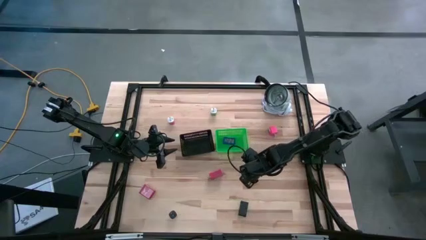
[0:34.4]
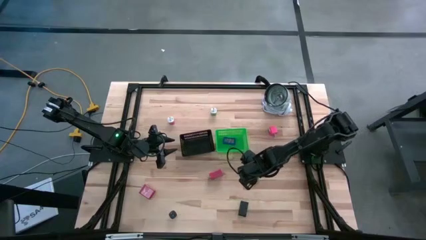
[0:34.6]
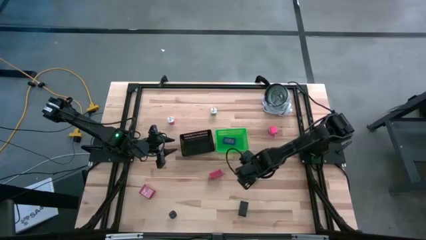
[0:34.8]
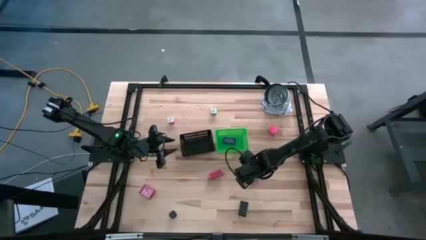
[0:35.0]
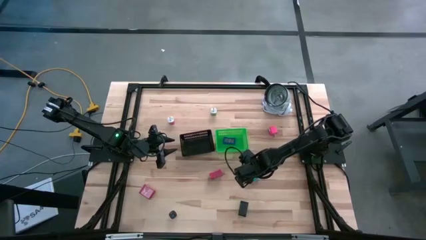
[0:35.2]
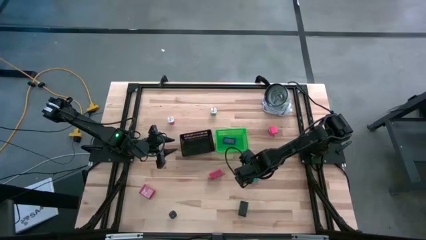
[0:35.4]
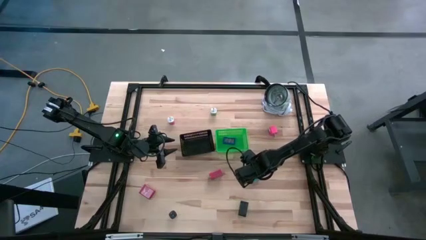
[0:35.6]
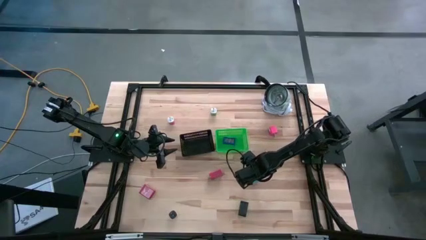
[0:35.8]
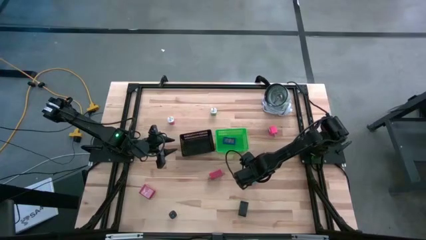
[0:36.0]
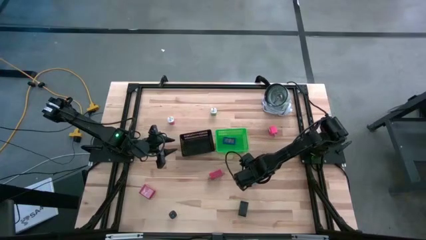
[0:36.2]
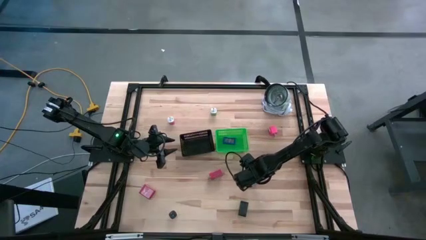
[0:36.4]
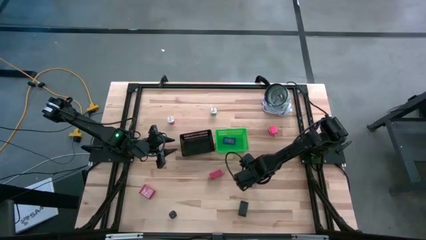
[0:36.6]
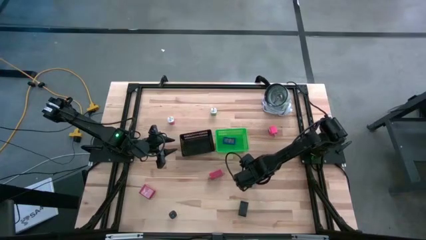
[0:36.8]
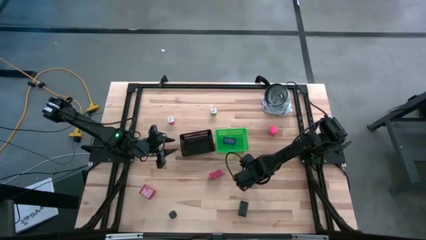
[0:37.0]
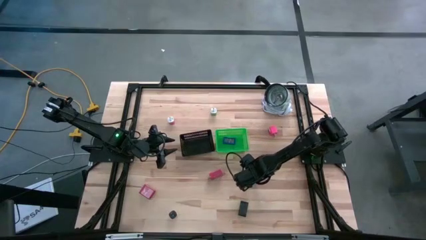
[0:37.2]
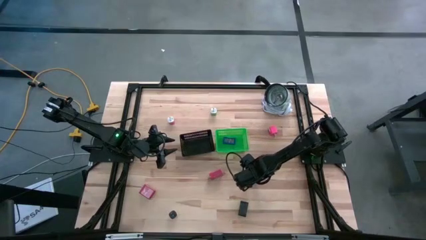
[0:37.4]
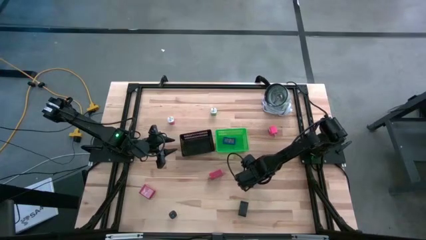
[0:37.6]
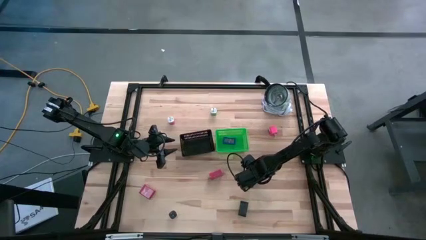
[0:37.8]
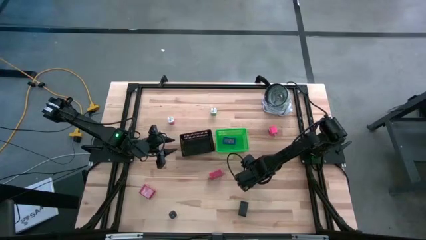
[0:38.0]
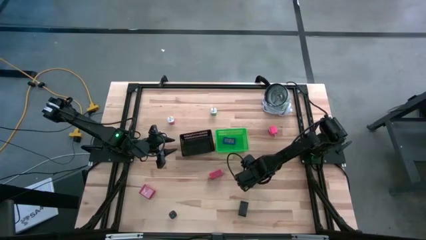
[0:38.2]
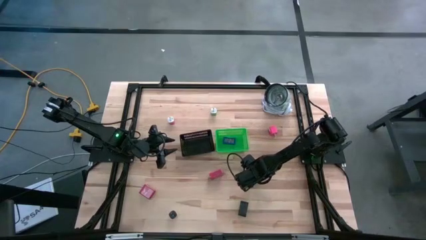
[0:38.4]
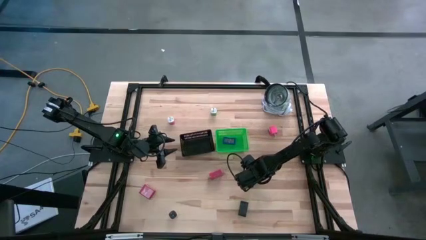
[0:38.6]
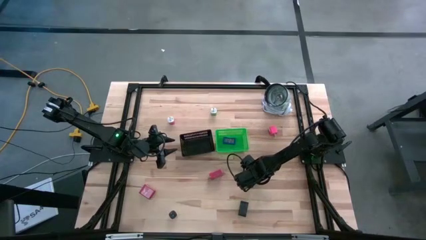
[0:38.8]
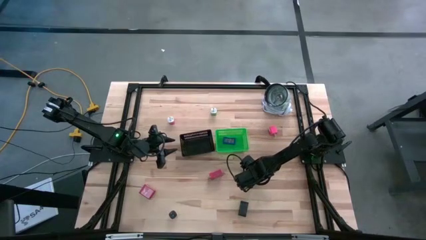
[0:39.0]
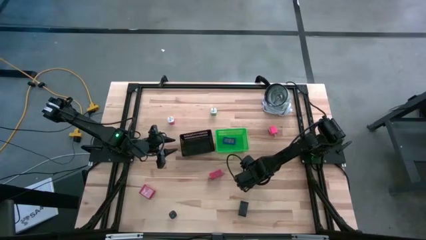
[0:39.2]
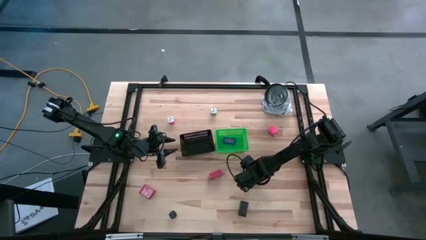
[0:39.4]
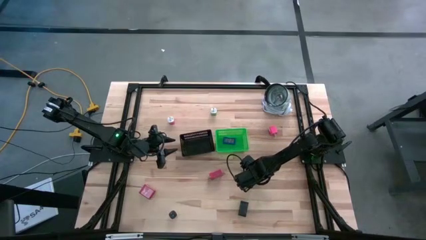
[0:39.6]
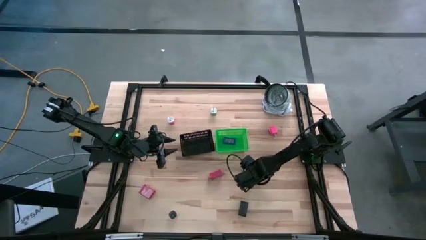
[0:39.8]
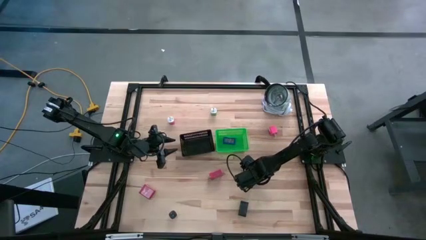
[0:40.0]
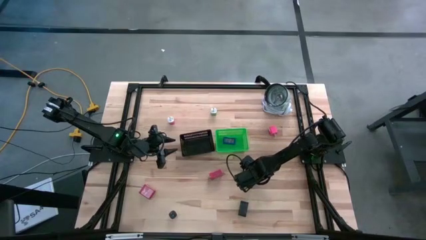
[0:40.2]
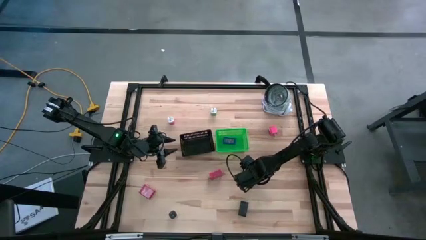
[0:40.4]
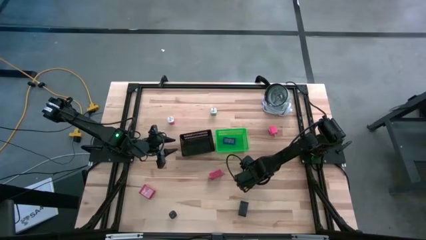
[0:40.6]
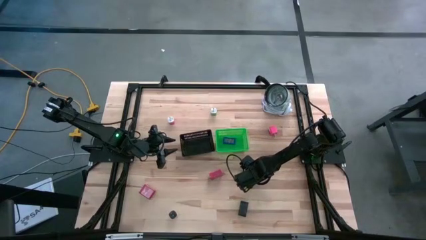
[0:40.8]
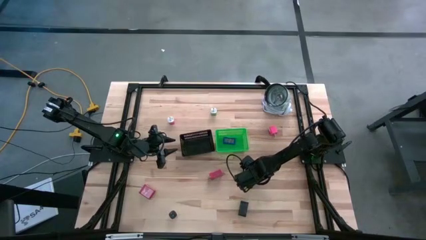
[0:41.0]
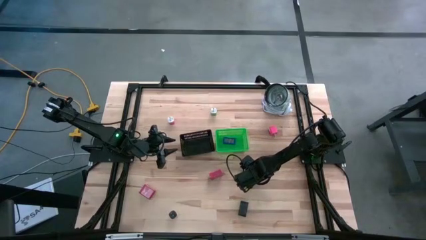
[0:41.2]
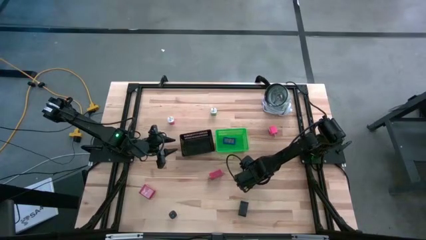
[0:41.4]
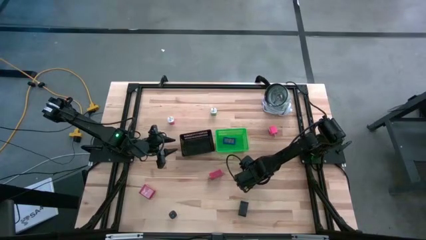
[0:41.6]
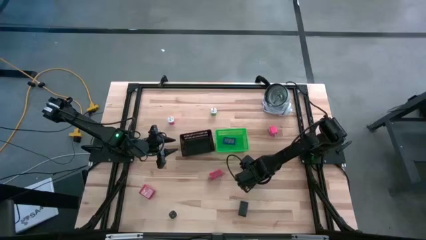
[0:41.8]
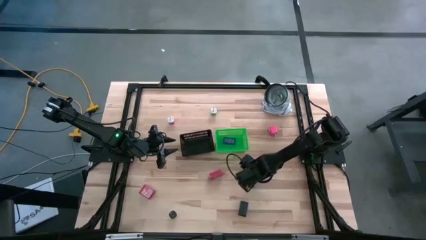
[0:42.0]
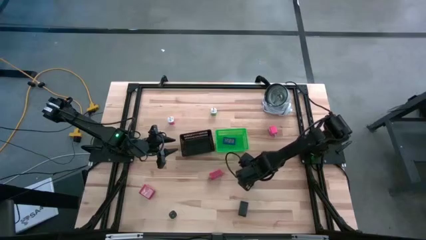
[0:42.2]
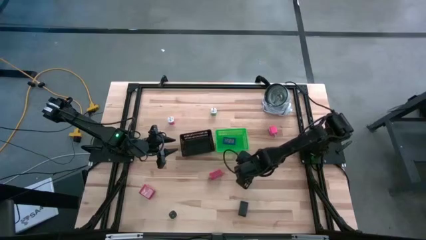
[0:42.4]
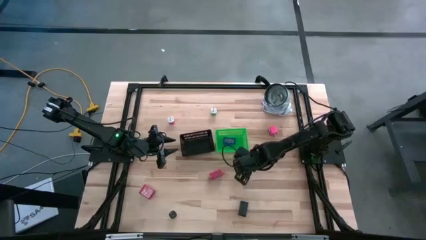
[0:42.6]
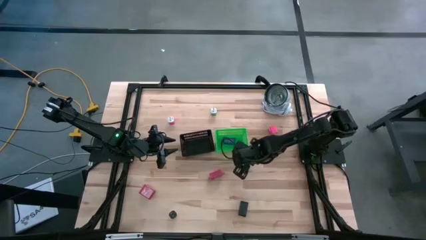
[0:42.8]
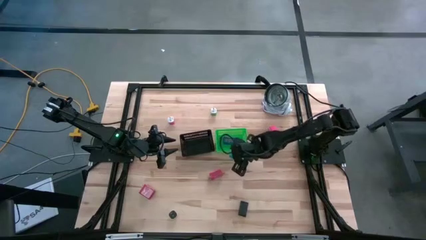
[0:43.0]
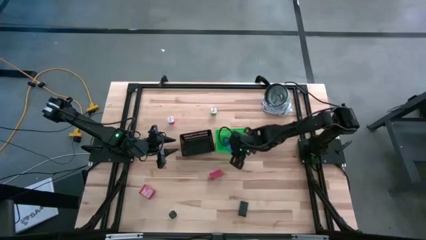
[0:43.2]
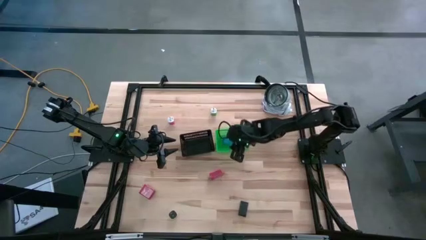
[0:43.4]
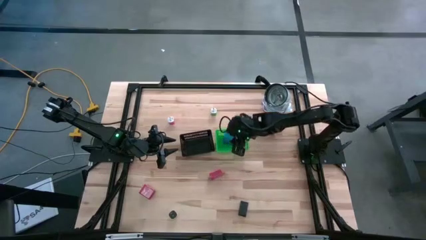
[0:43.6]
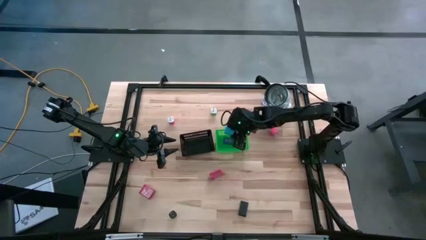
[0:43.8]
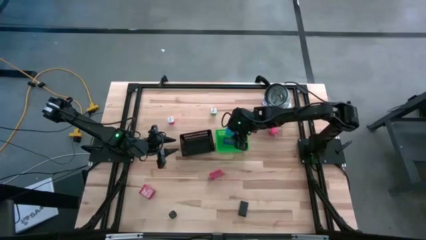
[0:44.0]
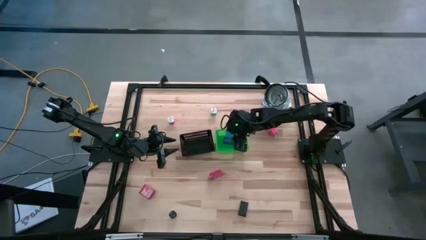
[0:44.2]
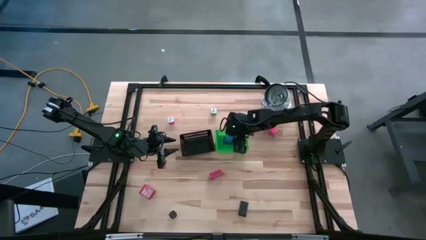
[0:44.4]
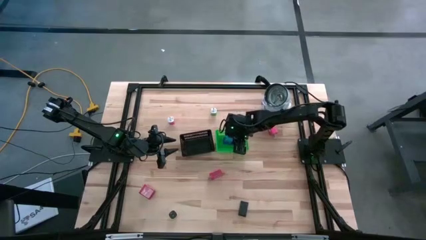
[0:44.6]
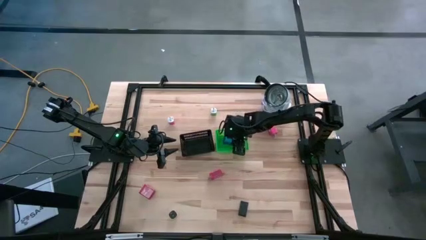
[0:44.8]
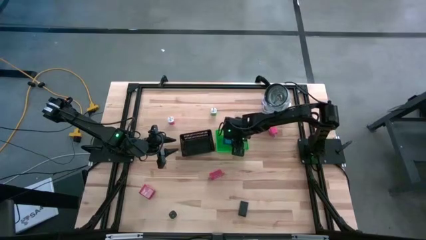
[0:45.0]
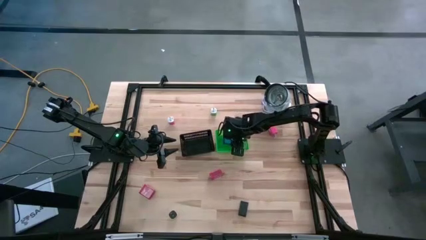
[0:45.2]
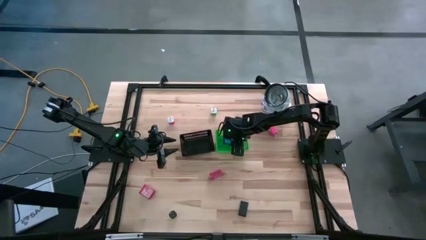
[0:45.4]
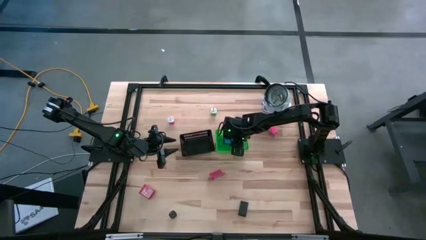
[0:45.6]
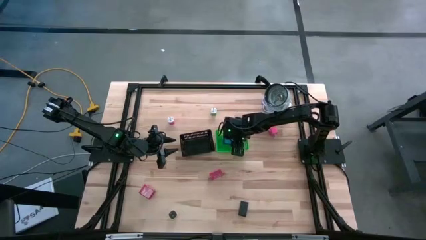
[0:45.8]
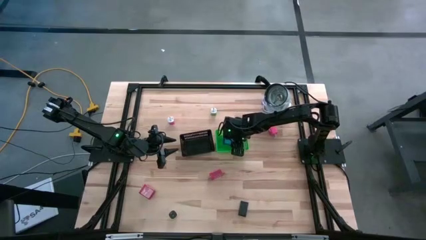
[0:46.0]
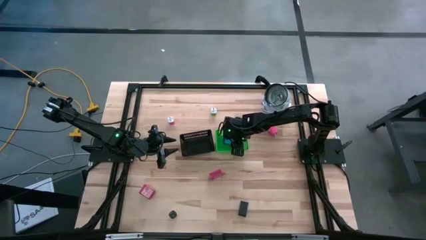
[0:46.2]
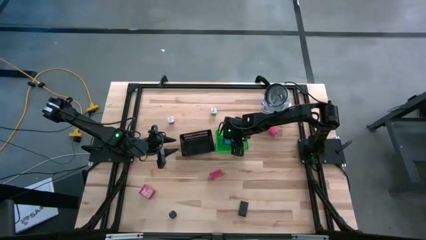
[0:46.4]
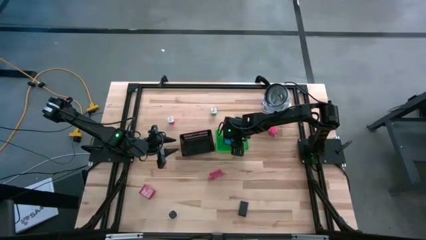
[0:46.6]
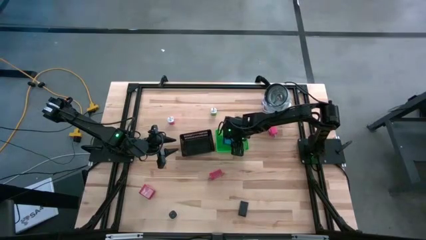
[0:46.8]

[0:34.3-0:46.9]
Task: Pick & Place Office items
Put the light blue digital timer into the green bin

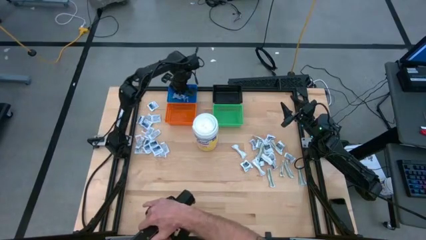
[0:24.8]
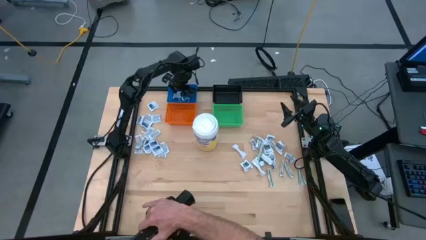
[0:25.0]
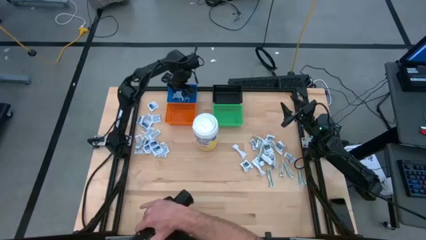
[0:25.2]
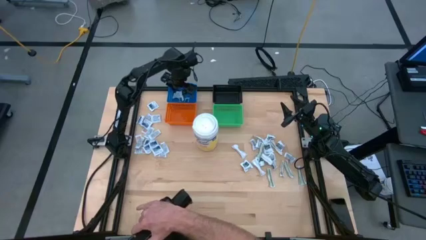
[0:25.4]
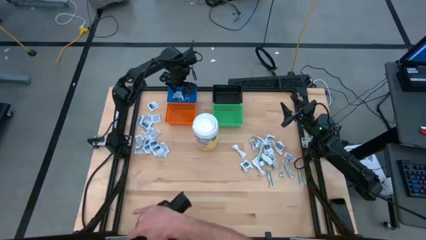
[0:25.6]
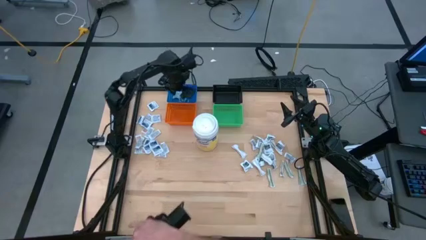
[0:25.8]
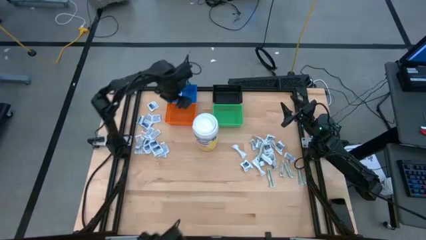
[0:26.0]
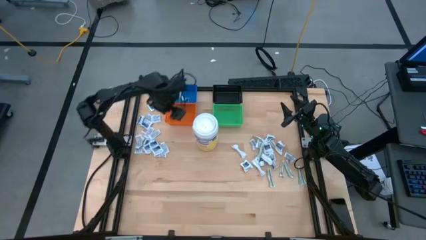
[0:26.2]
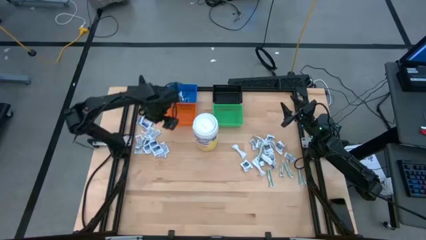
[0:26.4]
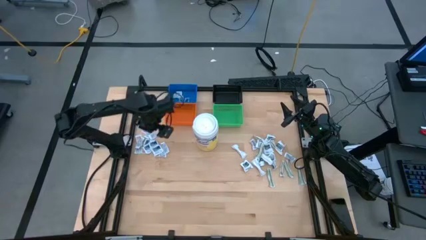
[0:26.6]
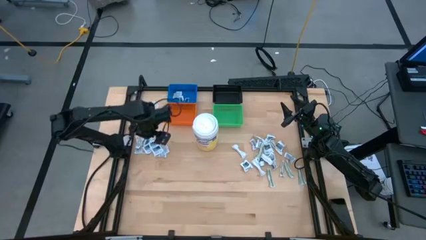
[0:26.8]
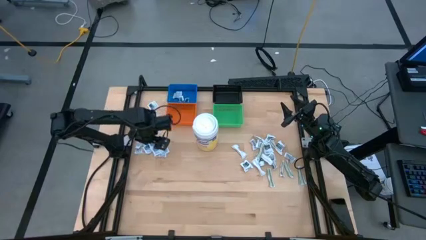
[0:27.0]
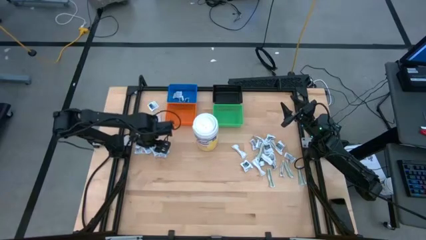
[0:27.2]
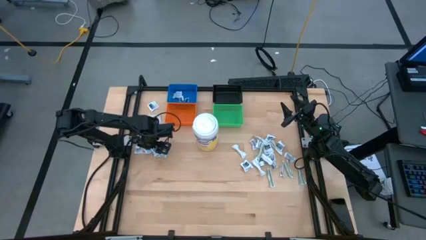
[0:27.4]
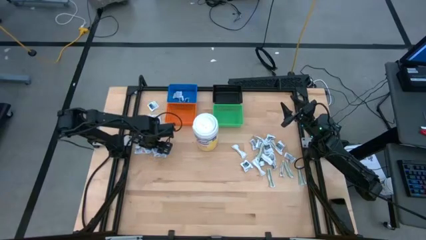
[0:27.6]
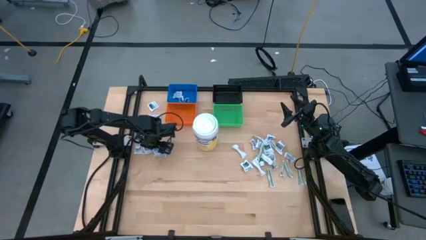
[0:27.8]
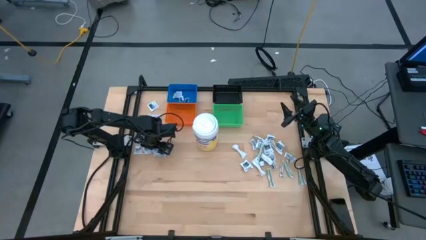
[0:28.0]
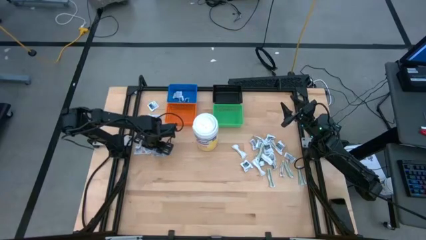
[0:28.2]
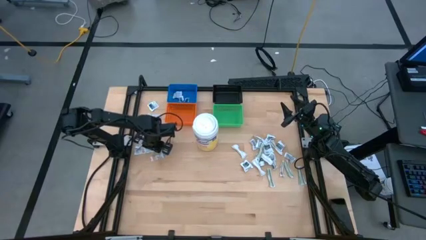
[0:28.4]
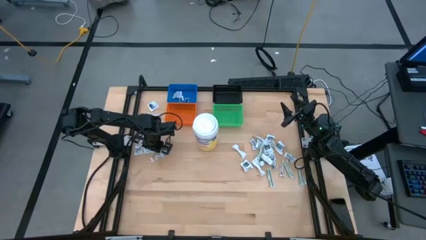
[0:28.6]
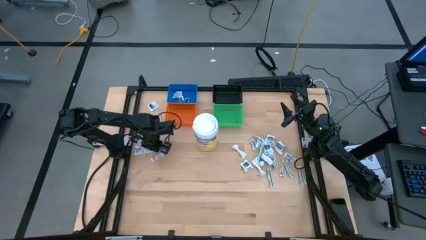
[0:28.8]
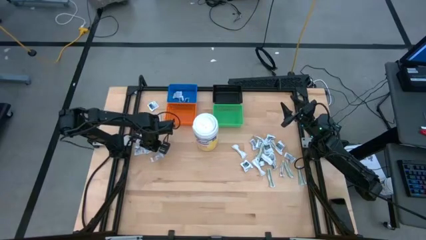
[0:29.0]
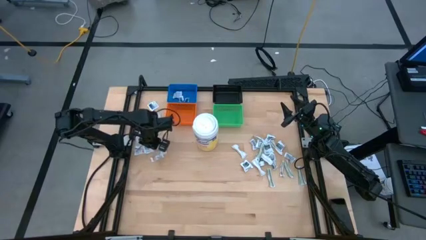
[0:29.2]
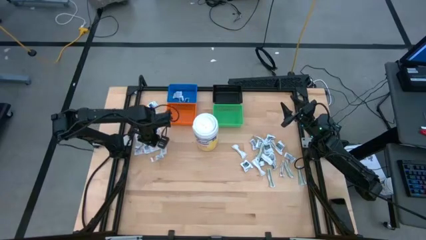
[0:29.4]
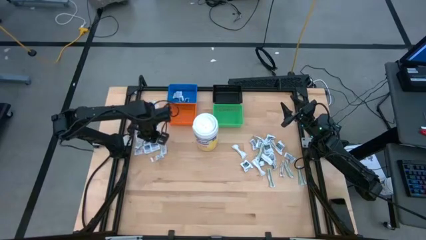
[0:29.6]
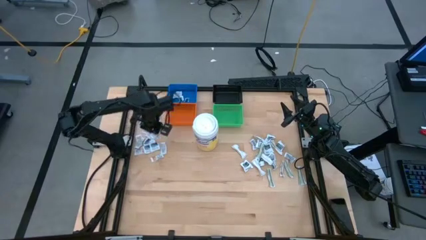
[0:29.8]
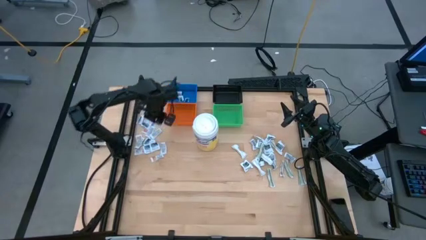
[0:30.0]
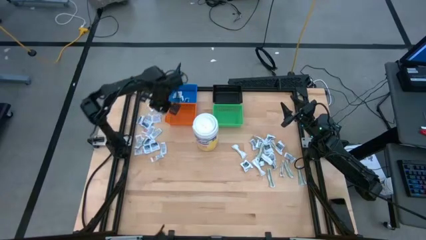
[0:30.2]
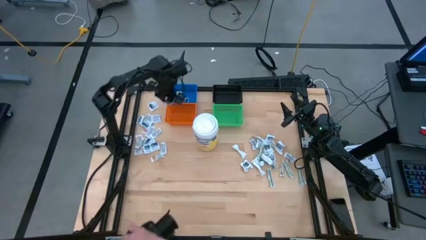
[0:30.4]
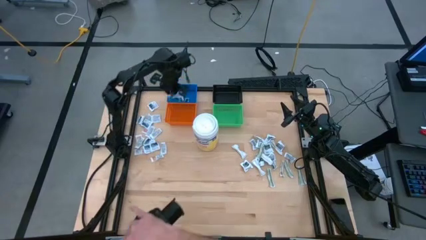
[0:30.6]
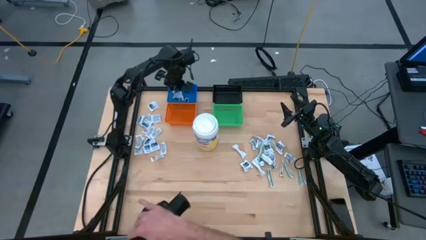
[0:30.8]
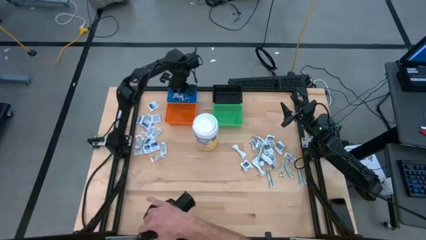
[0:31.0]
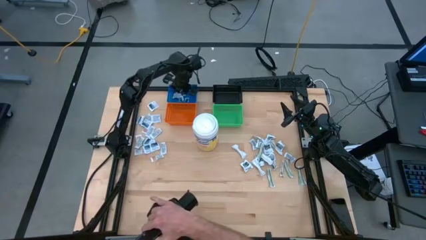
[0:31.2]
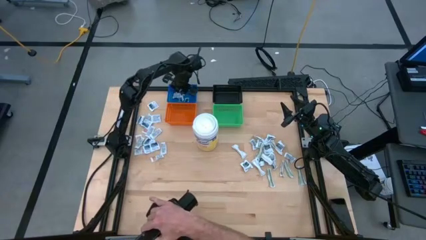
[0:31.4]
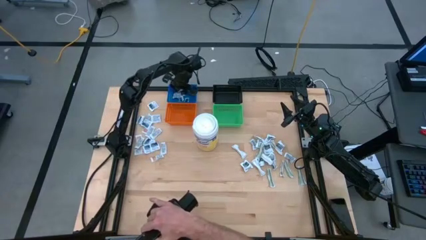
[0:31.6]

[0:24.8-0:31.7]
Task: Pick & Place First Aid Supplies
Put the blue alcohol pad into the blue bin
